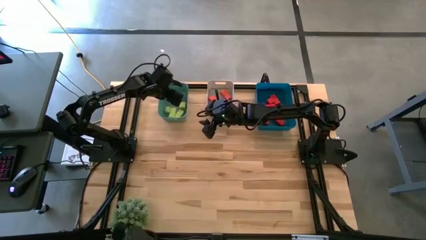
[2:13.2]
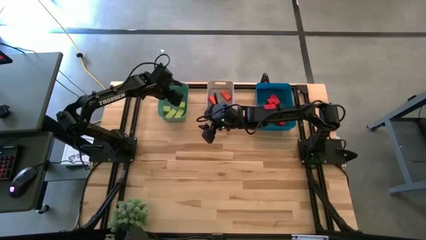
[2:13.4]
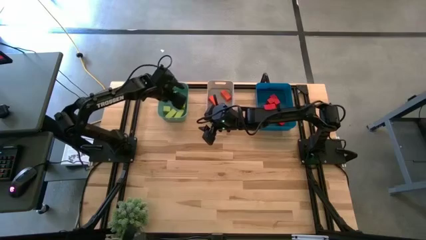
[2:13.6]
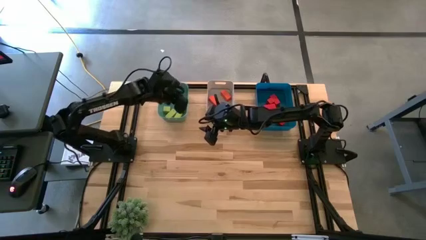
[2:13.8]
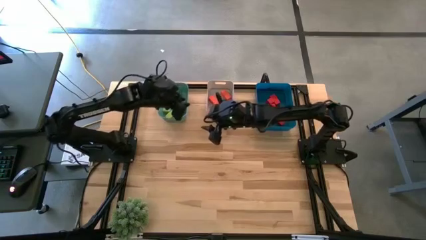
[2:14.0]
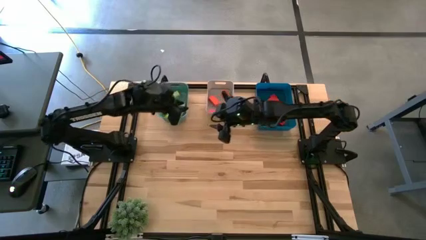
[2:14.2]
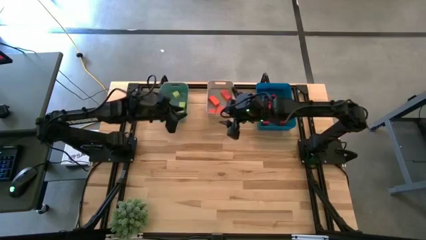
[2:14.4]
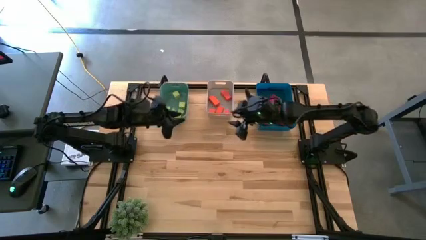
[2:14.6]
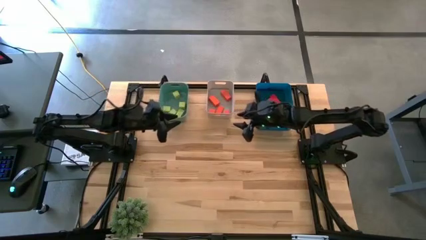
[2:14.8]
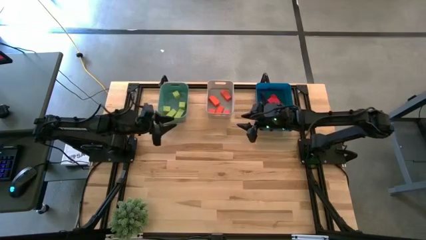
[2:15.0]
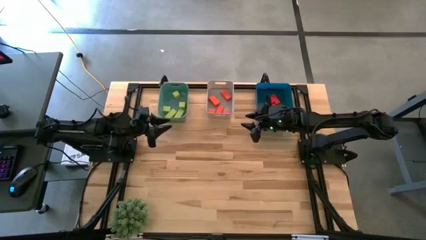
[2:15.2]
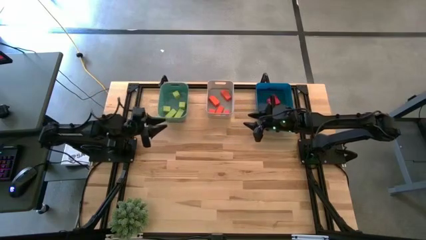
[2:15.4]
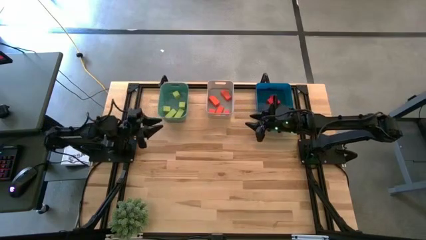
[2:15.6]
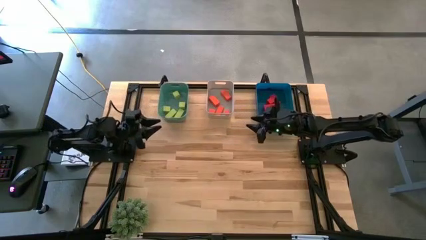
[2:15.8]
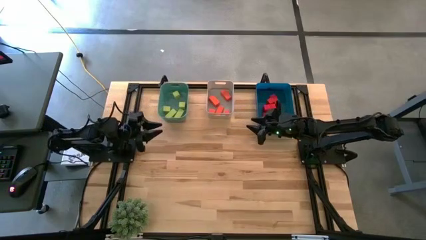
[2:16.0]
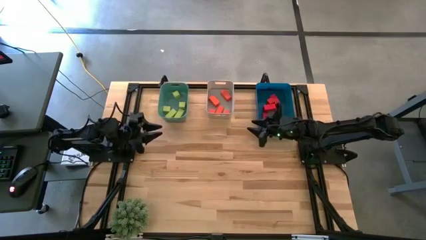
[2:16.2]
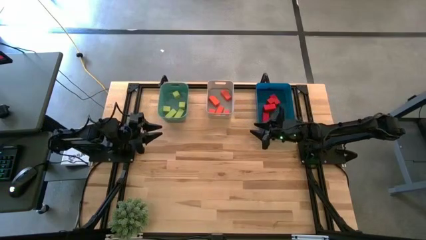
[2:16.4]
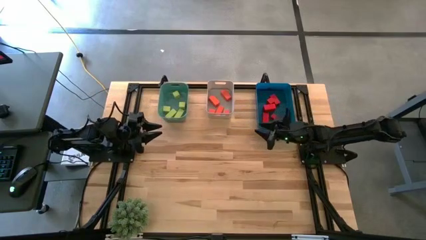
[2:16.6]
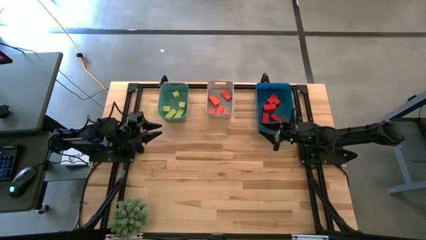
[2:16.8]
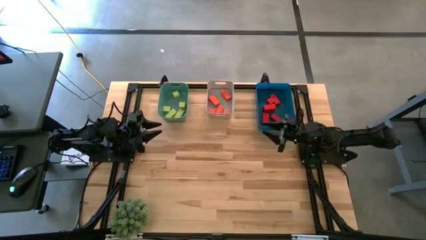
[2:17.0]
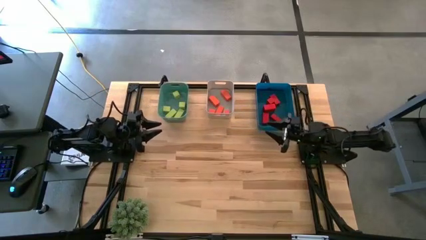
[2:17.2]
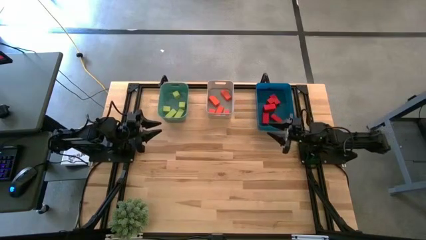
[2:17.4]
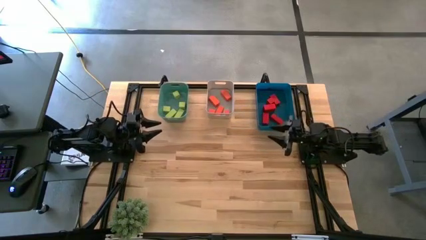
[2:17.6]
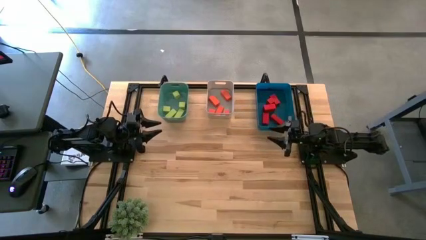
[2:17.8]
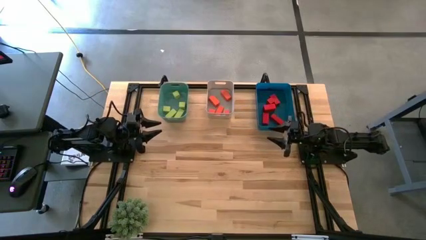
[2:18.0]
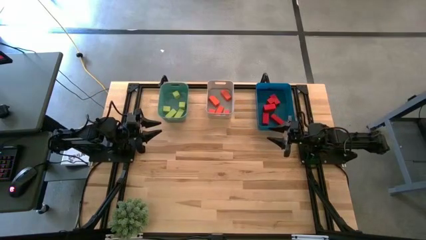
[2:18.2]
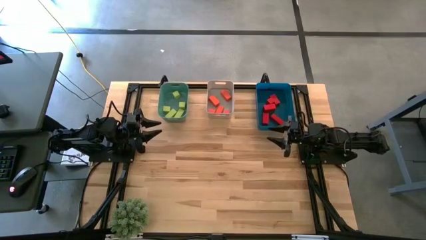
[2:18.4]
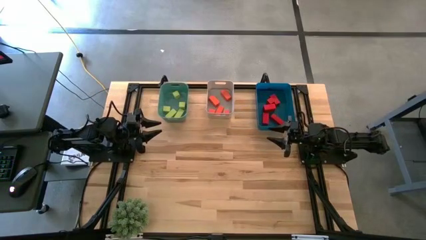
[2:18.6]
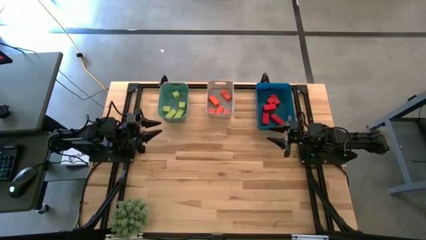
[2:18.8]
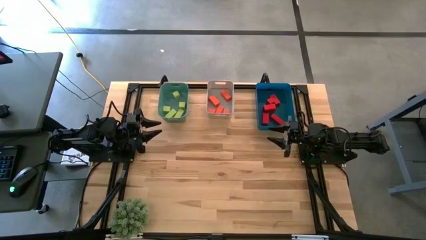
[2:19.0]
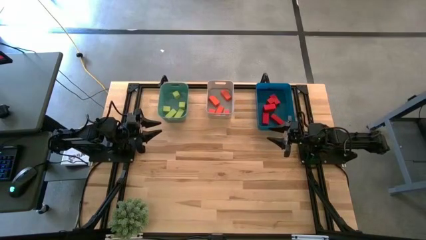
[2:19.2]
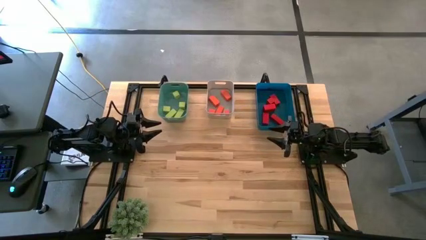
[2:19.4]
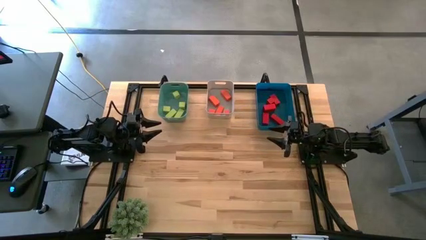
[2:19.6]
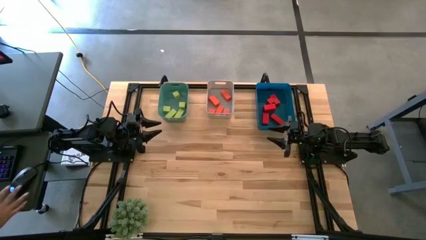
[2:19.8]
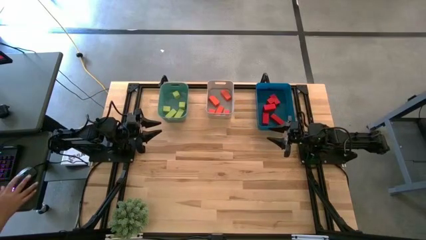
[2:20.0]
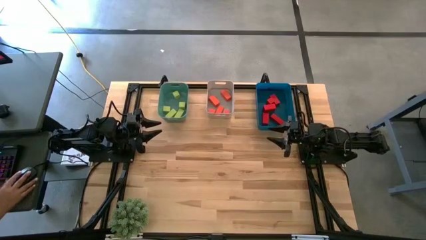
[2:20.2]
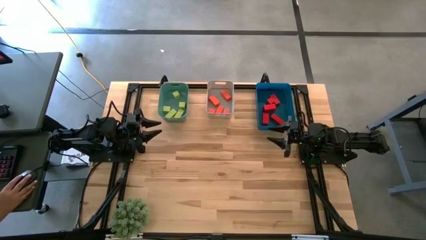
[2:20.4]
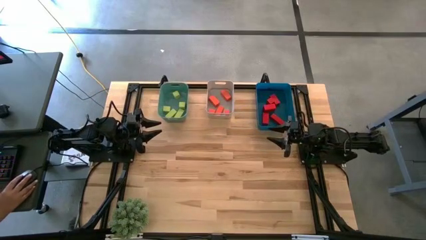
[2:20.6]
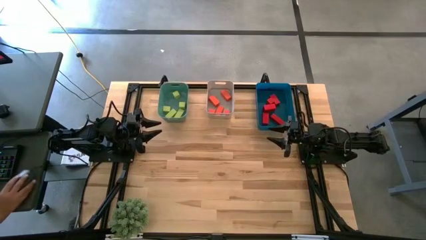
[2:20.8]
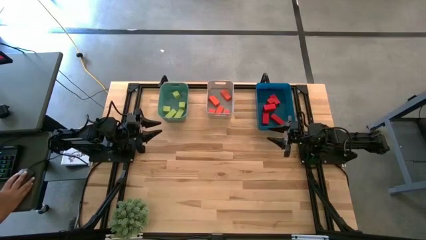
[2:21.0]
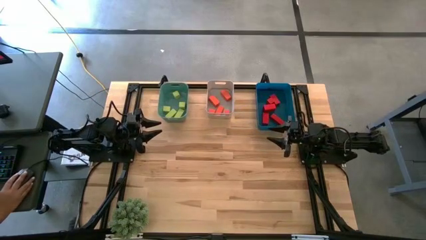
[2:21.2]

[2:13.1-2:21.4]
Task: Sort & place blocks by color
Return to Home Position

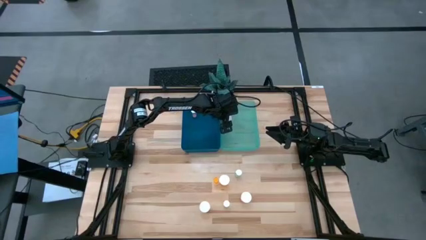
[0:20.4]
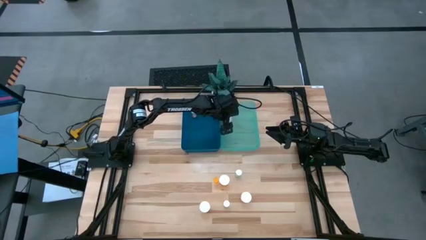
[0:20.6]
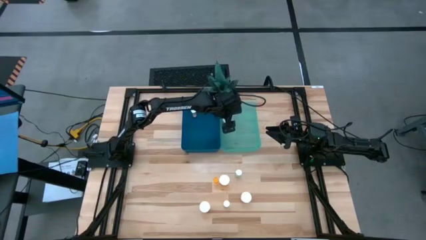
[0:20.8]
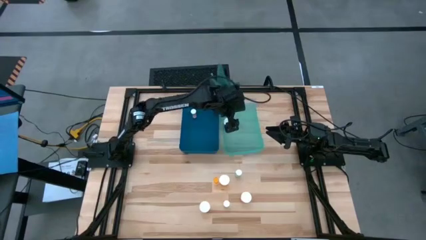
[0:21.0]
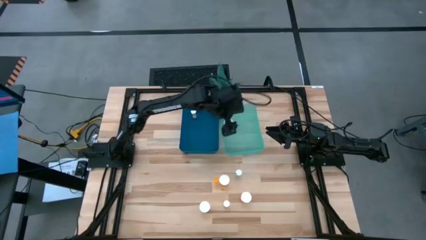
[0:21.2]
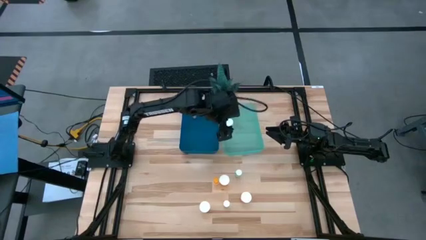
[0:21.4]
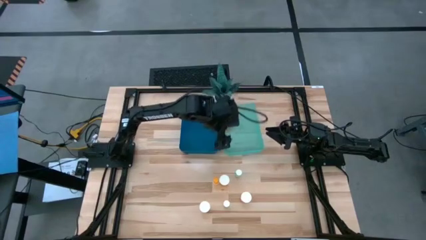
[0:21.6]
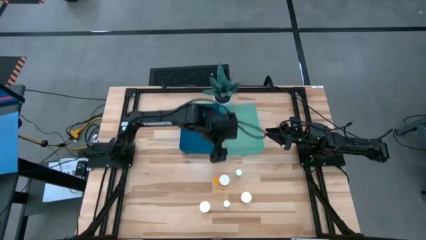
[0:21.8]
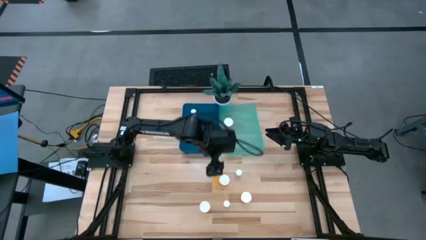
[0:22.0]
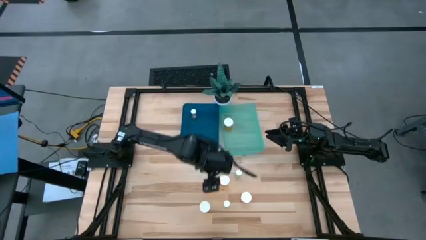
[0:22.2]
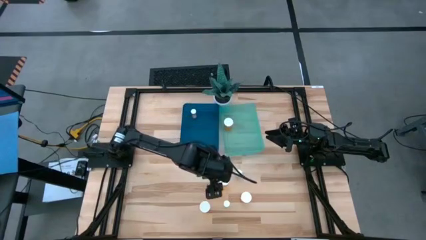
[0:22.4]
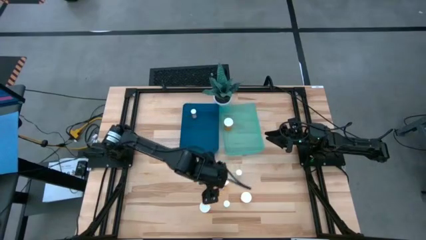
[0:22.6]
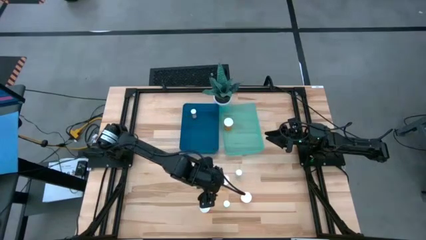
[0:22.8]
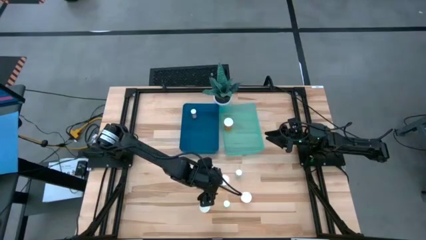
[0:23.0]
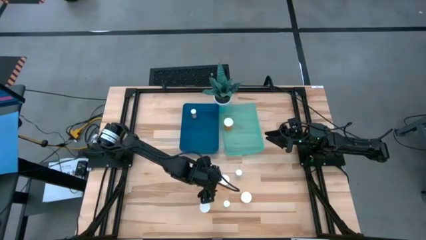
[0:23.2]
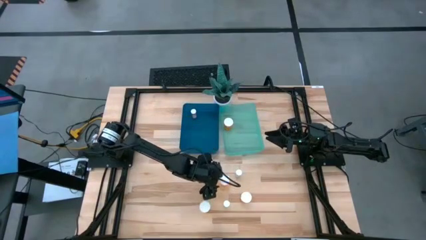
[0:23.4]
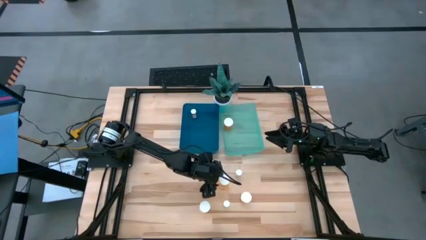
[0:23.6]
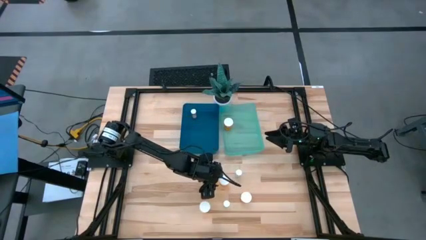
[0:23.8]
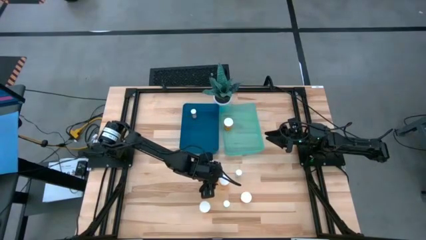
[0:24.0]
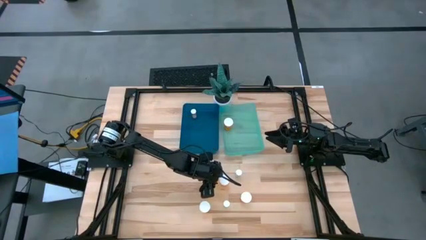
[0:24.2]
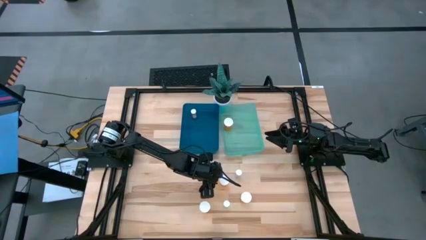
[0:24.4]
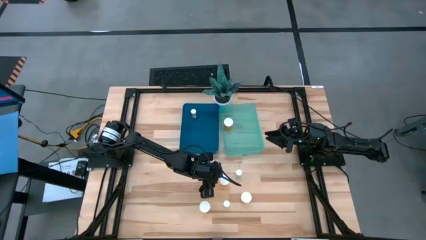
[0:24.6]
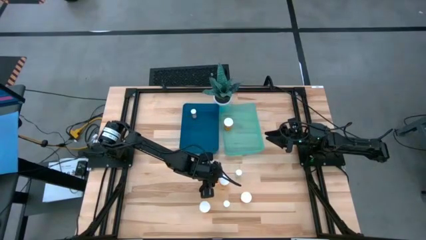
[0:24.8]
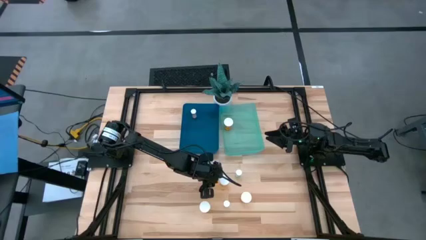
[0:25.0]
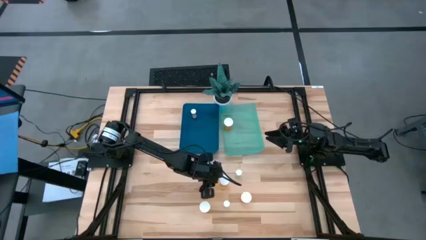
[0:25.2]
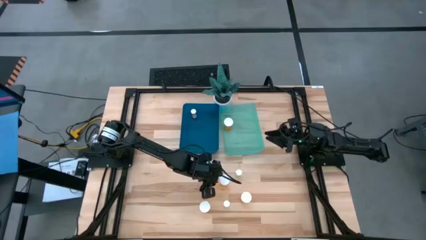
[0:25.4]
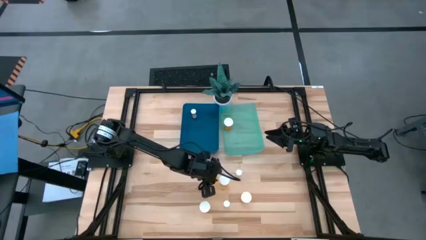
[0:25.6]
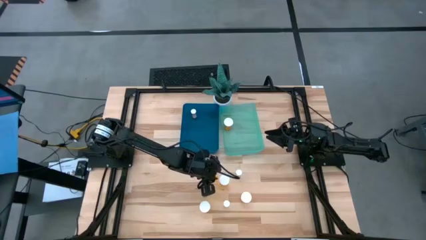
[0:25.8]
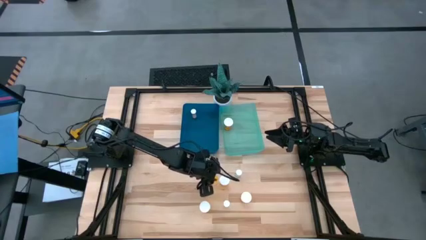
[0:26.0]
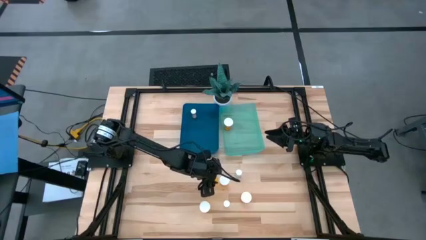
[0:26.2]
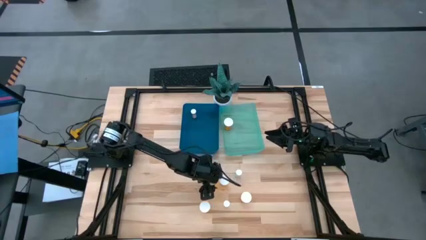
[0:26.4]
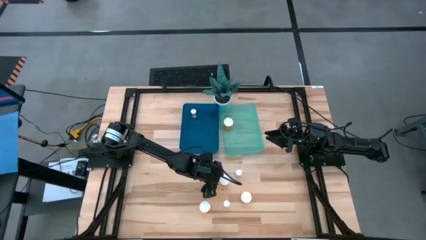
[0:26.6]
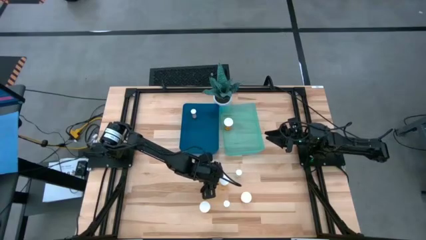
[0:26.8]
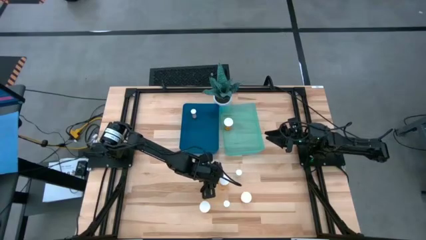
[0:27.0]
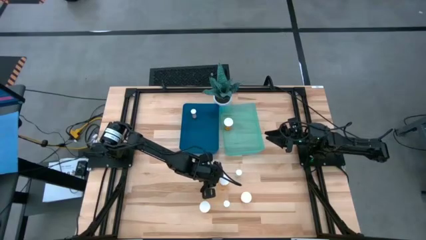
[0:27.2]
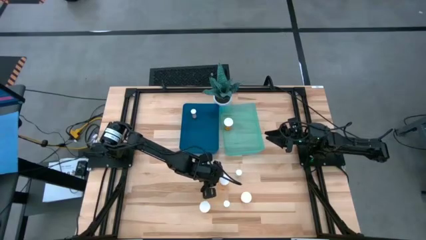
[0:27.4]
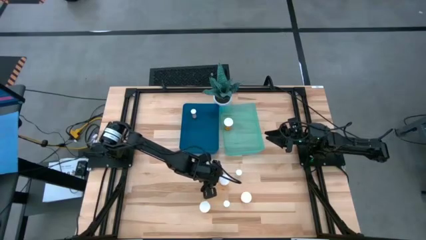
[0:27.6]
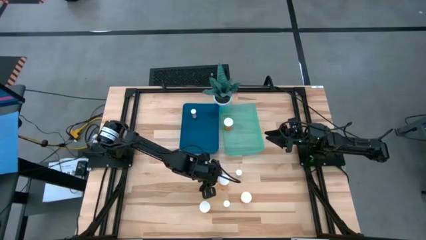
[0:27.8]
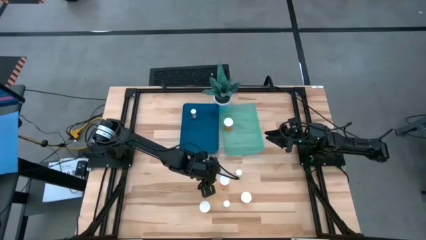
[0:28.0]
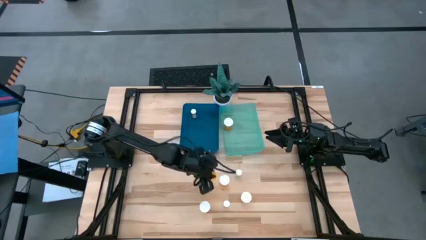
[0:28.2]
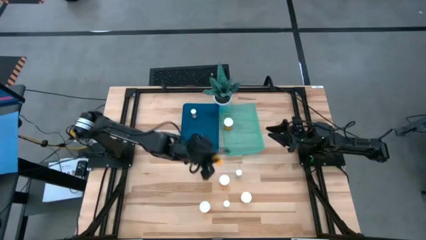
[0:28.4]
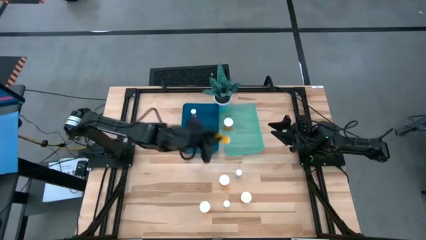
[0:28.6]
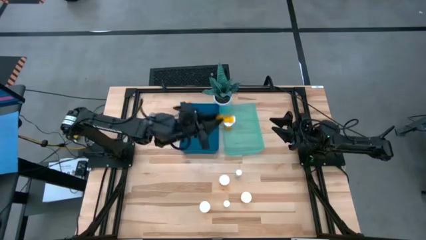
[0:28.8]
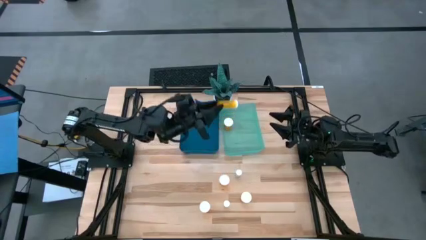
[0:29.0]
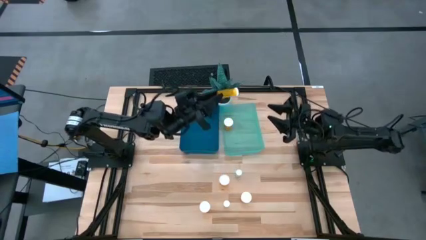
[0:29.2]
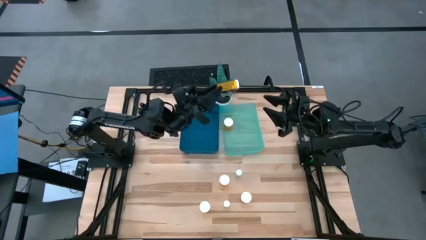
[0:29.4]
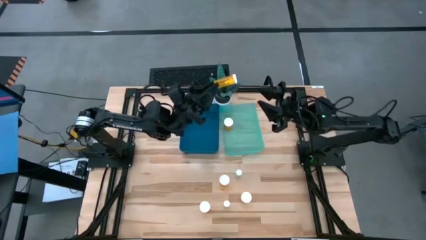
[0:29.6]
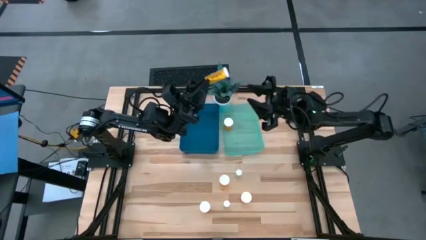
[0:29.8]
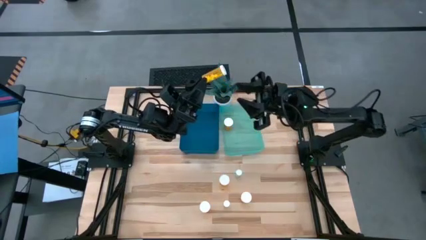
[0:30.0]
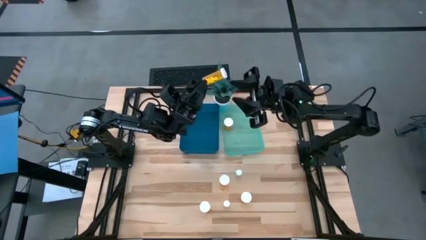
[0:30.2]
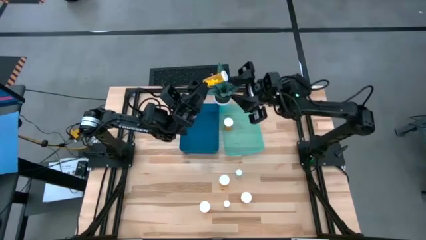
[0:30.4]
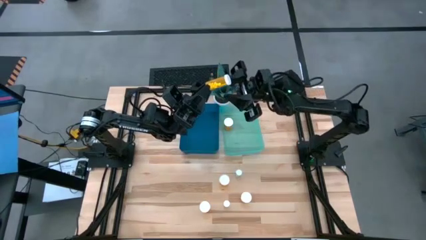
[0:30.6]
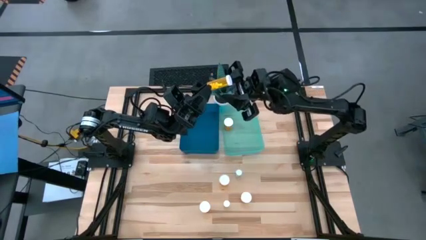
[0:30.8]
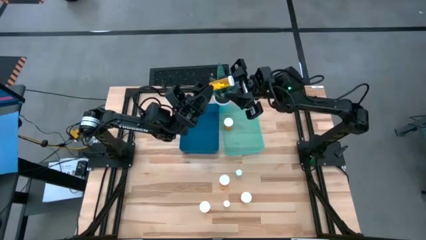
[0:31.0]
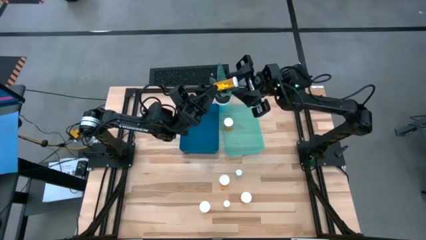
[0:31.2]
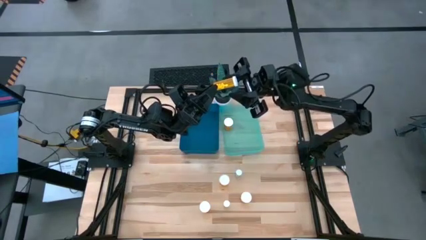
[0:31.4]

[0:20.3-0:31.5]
Task: Pick and place medicine bottles into bin by pill shape (circle, oval)
Put the small orange tablet bottle into the blue bin
